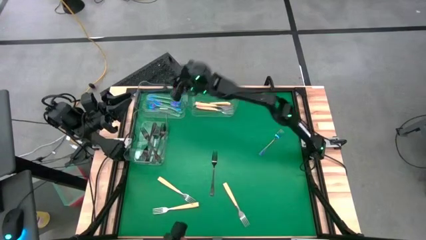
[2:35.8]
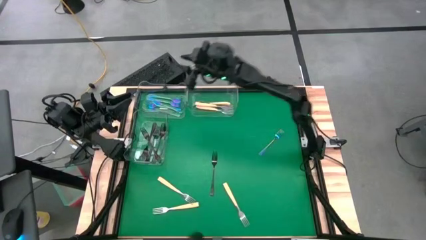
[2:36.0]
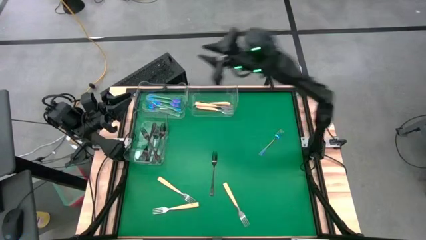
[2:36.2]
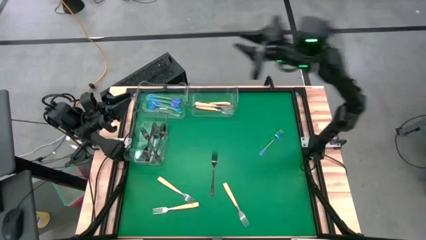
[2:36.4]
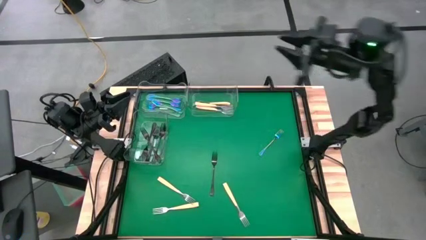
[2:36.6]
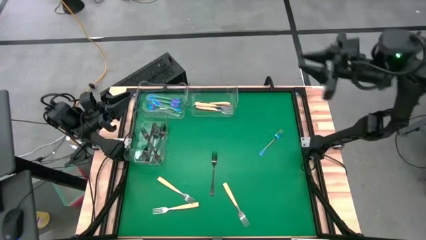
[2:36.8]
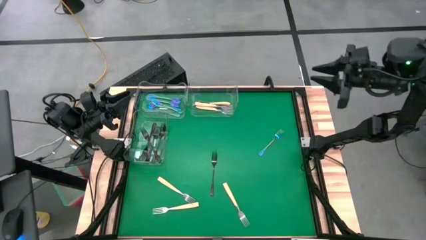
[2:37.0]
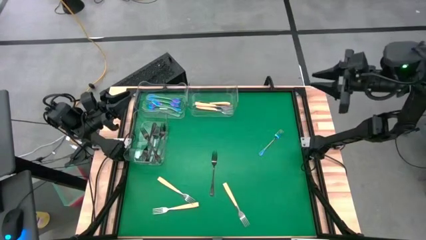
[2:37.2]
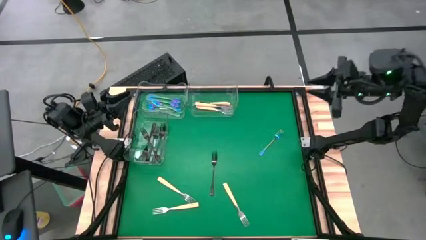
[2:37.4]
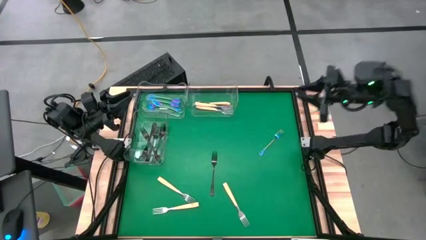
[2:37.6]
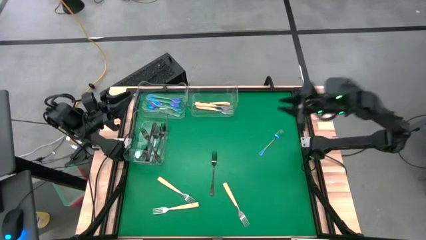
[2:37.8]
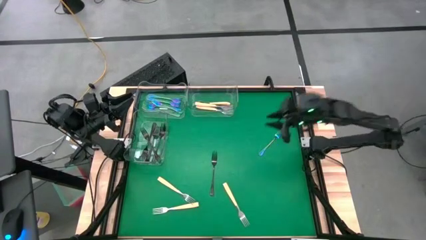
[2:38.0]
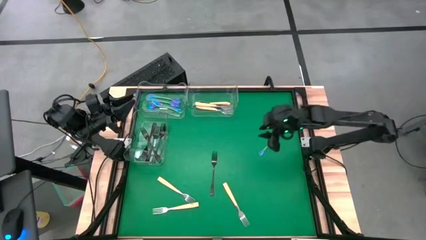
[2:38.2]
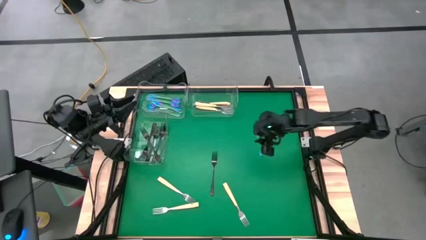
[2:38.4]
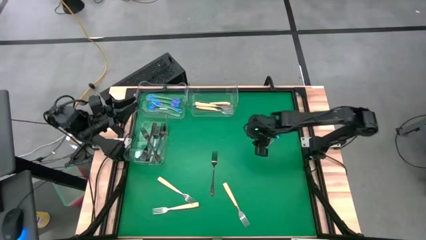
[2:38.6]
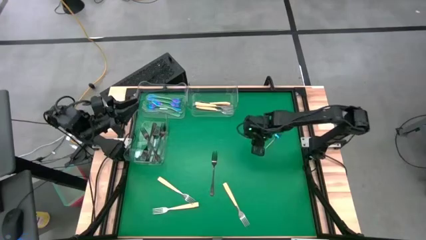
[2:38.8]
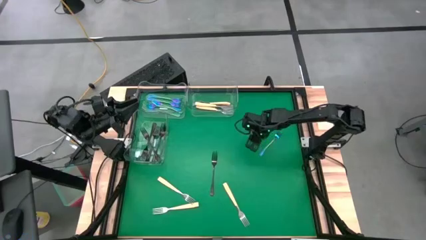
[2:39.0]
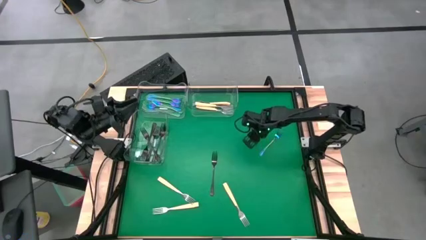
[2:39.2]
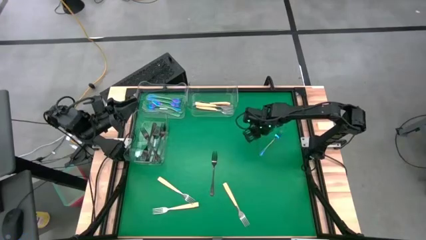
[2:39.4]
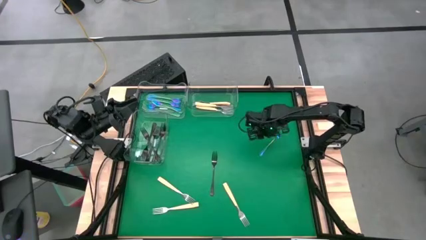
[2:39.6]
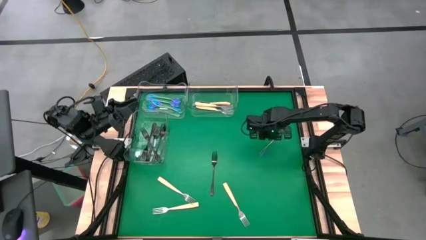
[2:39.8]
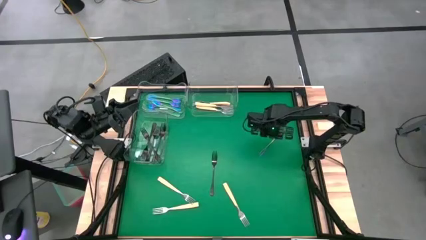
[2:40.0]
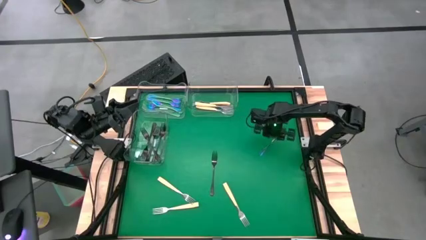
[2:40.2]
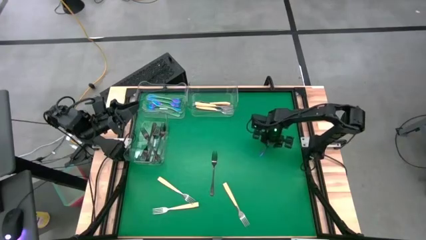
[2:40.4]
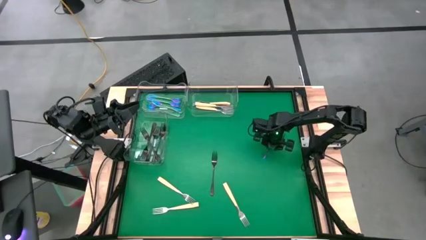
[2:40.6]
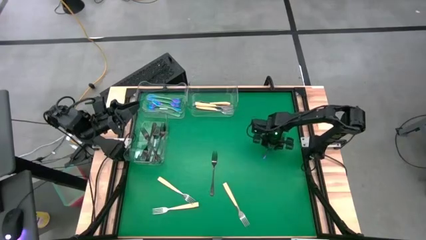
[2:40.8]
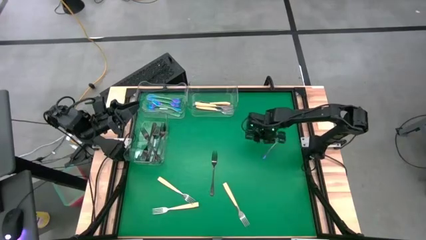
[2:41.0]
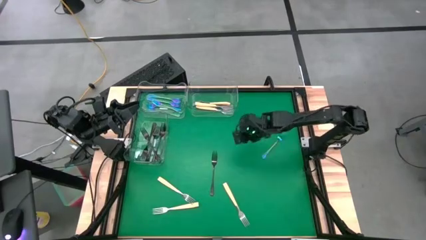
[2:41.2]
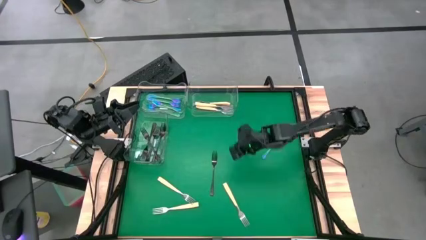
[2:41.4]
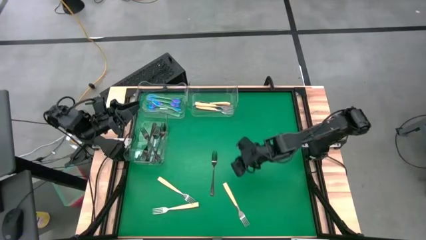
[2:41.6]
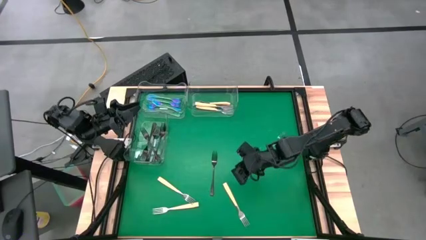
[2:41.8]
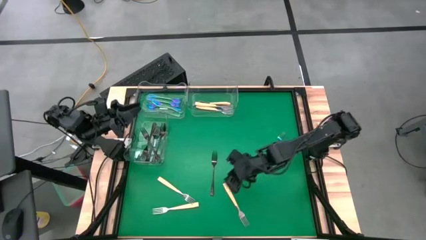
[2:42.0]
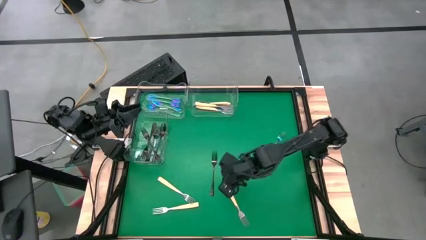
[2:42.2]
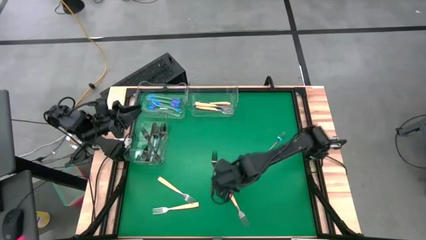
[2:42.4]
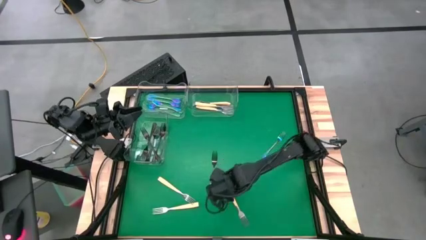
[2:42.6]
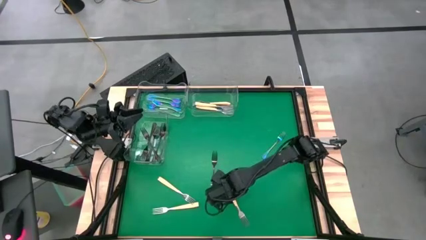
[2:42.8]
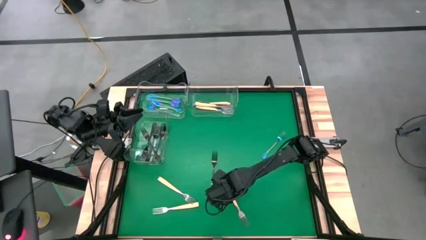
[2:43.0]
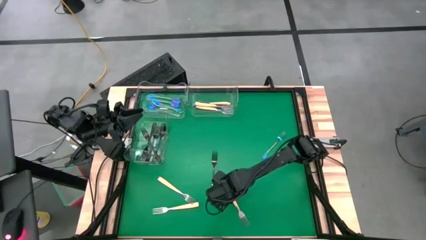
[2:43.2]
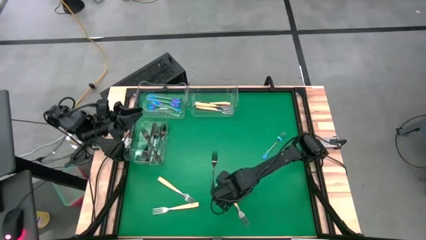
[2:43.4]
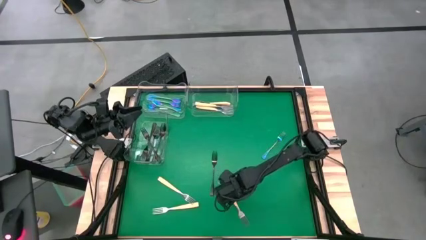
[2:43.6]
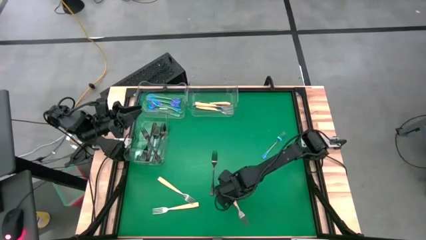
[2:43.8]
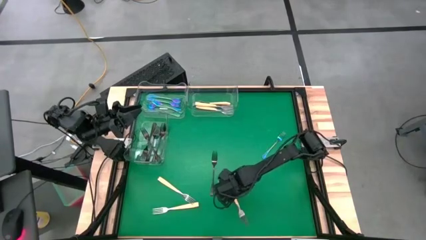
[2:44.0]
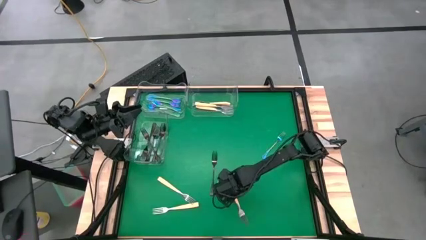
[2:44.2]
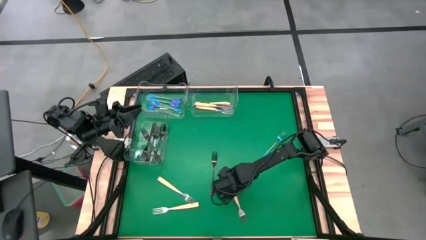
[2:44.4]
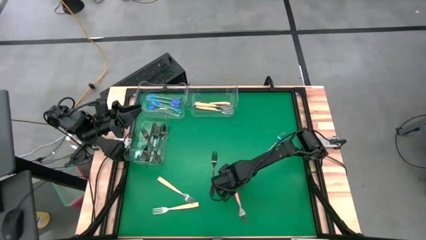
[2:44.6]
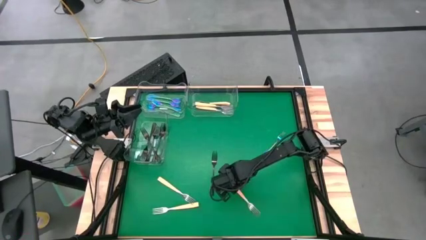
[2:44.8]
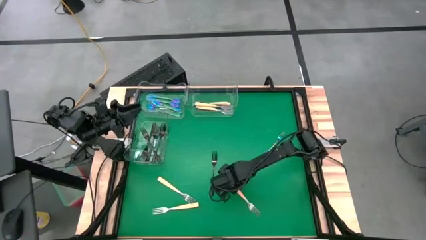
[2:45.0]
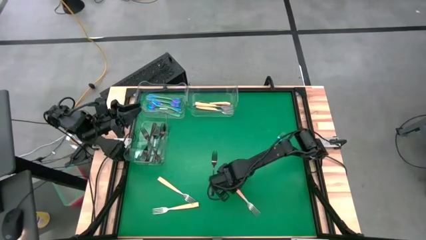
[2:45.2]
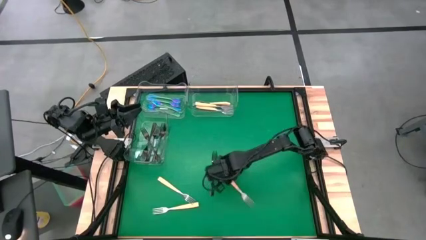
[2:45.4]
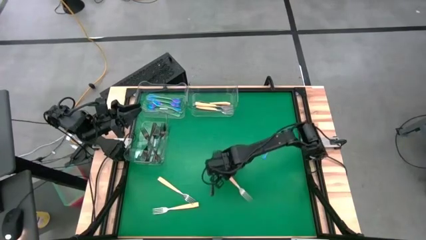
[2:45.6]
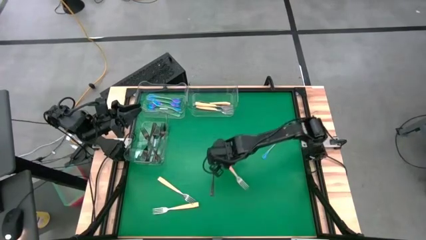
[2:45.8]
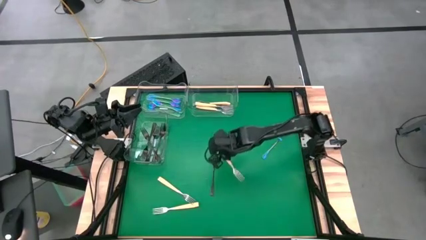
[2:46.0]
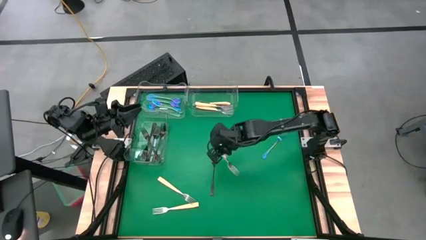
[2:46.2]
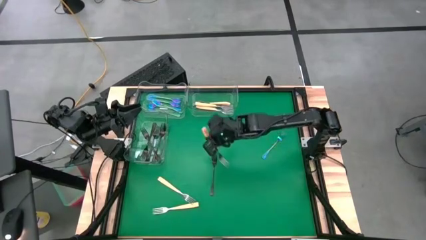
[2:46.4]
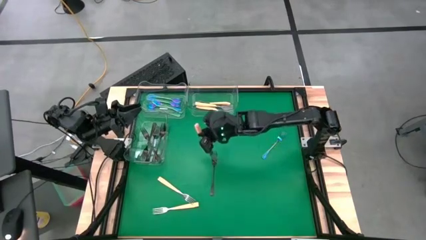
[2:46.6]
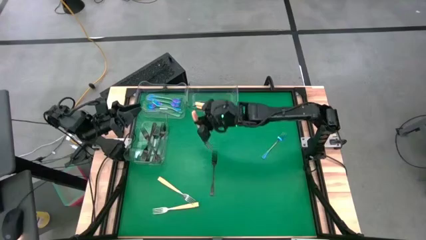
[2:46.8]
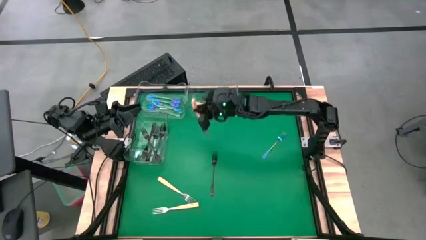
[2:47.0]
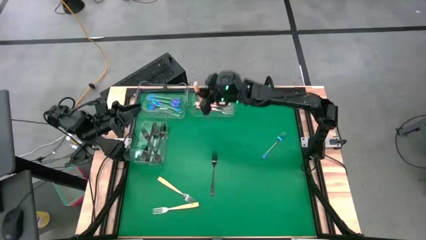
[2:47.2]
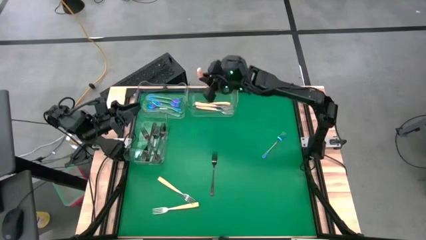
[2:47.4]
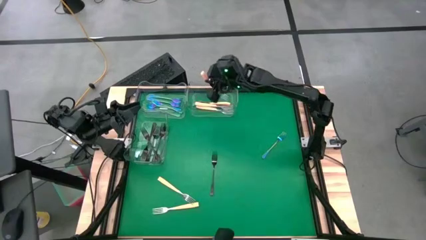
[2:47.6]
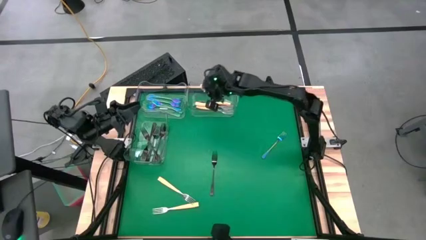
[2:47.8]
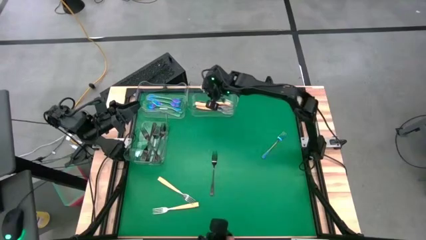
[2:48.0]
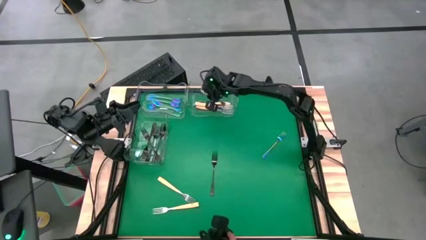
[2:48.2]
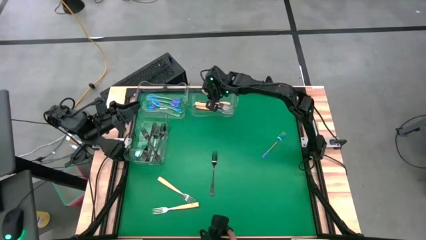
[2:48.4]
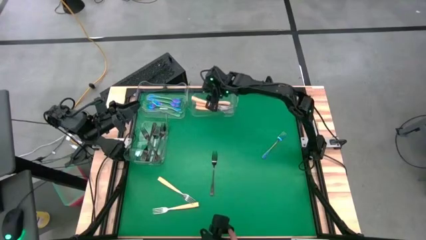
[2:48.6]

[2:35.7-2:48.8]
Task: Sort silverware by color (type)
Put the yellow fork into the top right transparent bin
